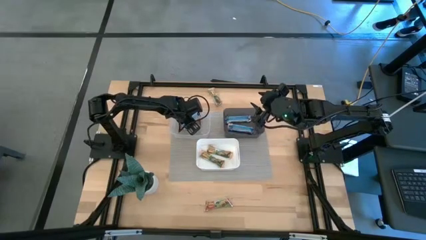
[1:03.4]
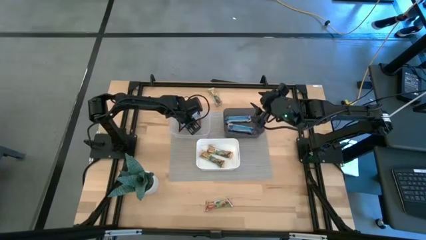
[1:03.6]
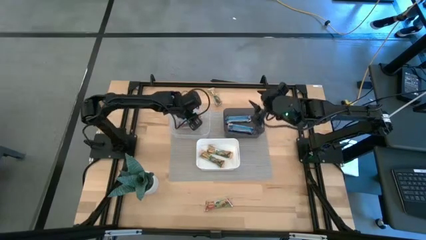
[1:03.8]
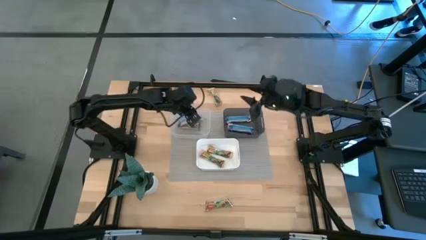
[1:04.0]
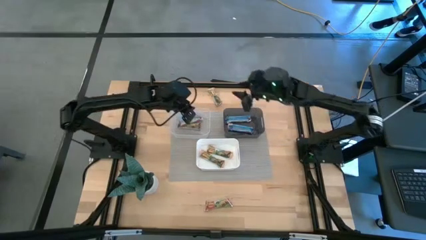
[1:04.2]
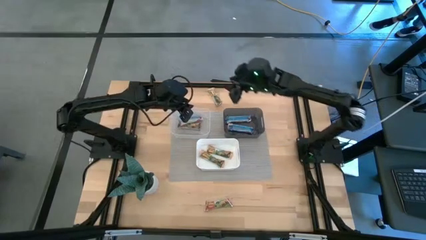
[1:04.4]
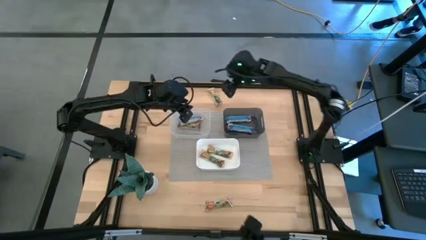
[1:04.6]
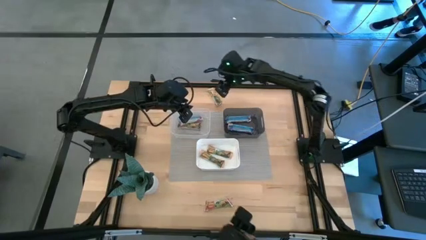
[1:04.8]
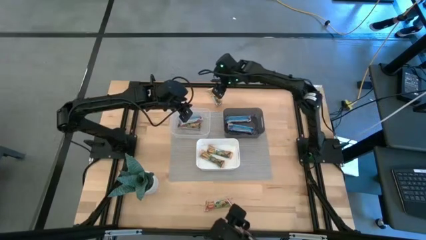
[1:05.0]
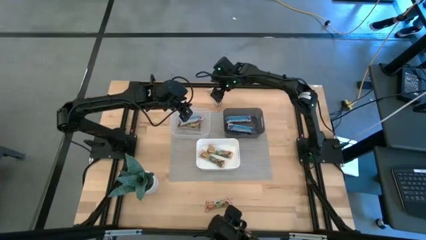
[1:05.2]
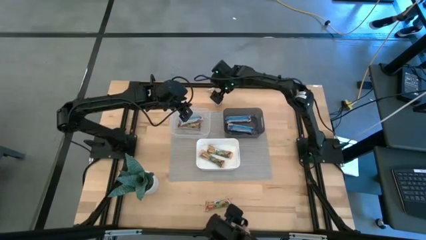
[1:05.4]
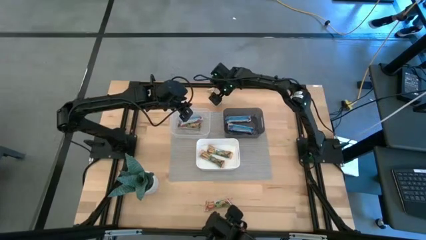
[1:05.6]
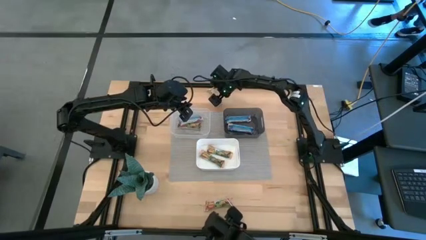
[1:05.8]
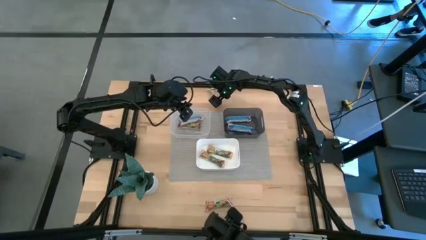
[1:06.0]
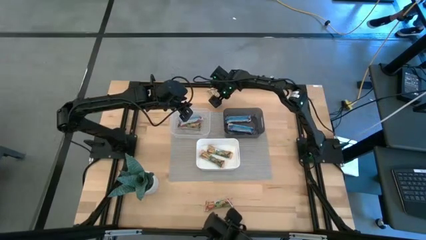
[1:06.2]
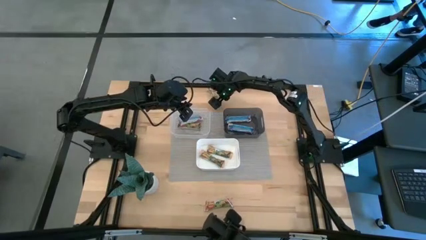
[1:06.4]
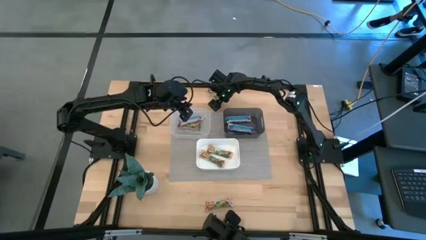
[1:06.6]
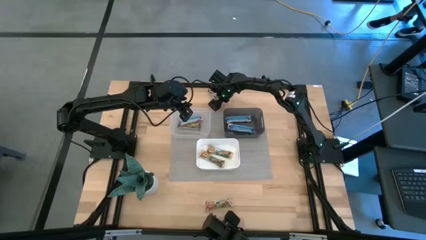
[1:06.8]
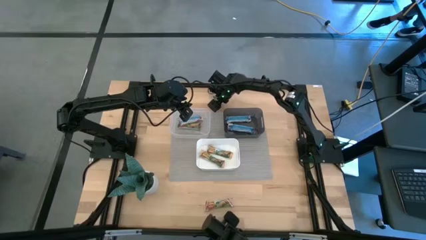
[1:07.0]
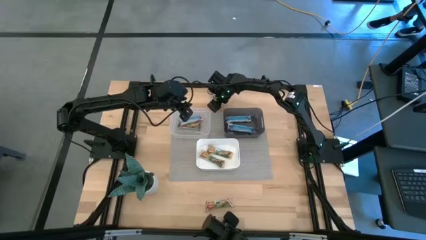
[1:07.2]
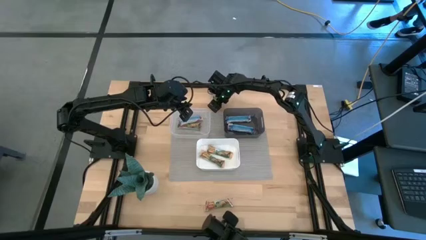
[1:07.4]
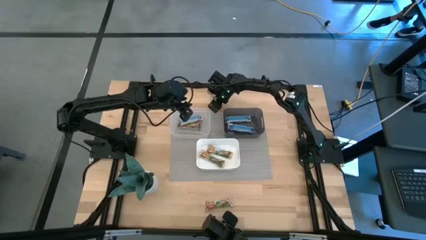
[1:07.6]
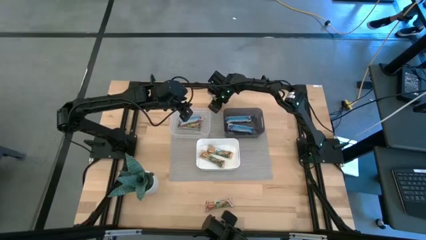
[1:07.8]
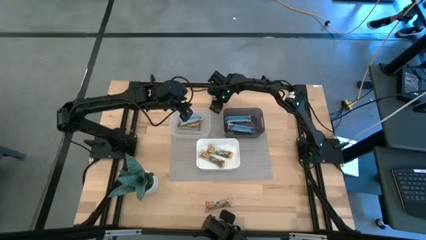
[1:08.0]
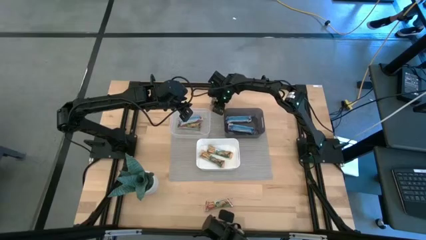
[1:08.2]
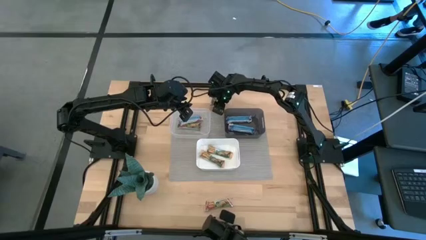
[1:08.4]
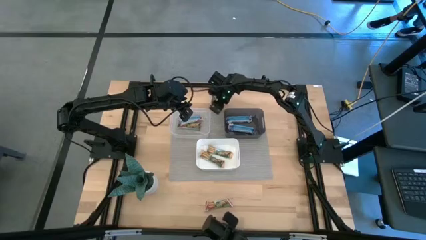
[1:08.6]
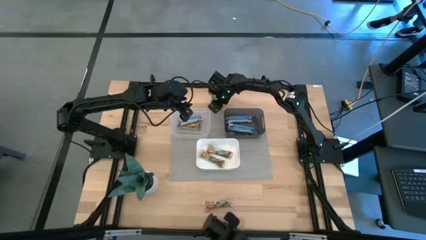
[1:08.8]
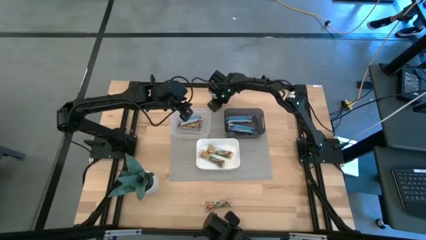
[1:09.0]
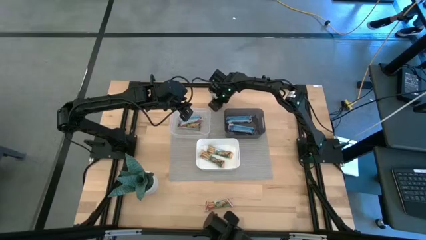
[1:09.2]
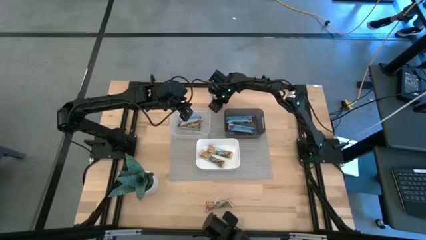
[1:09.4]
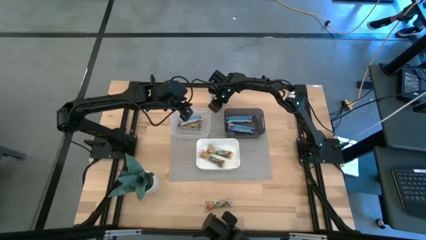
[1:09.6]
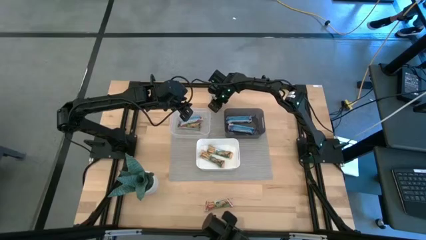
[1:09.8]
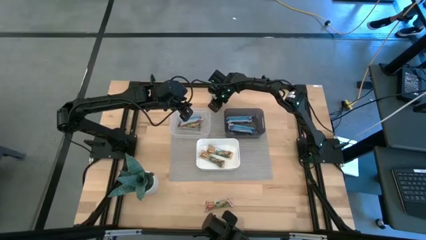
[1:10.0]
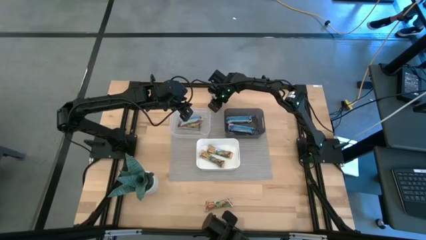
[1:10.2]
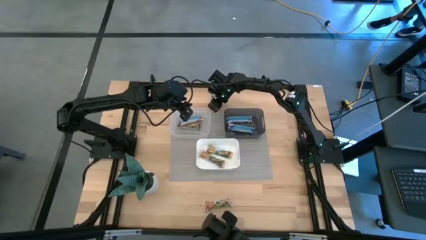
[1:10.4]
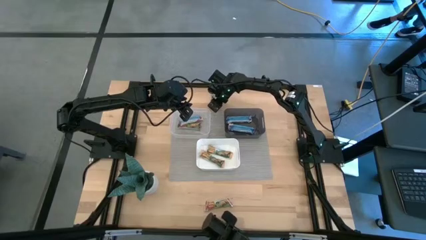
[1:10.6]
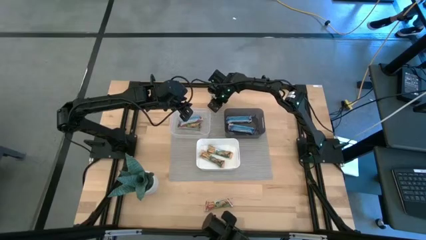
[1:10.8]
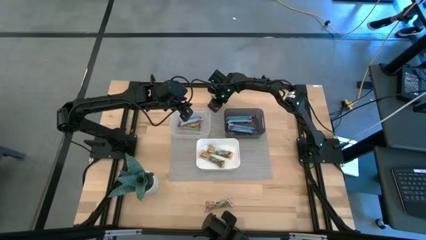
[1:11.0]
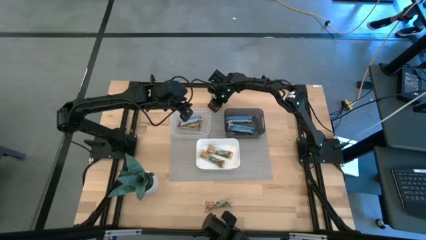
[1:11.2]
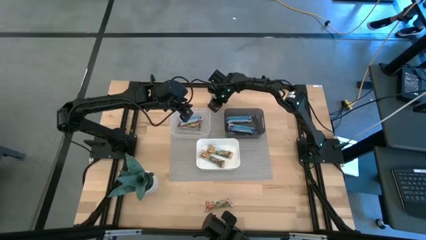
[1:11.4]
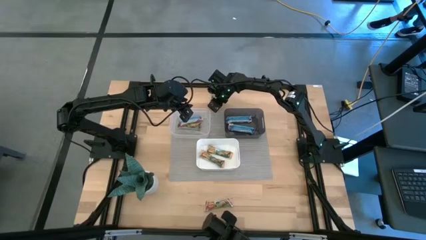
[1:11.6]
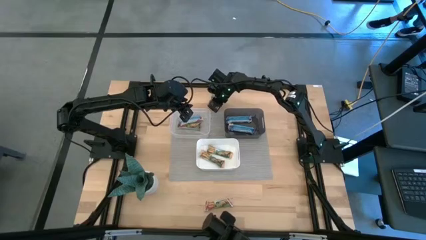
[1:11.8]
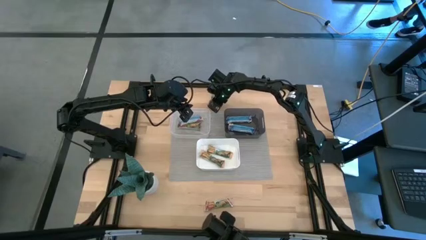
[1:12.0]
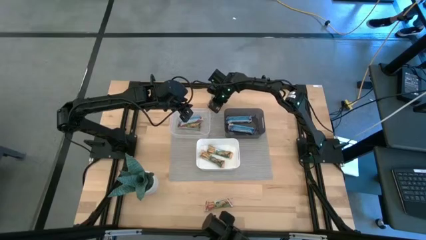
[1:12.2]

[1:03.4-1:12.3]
Task: Pick and place Granola Bars by type
Put the yellow granola bar into the white bin

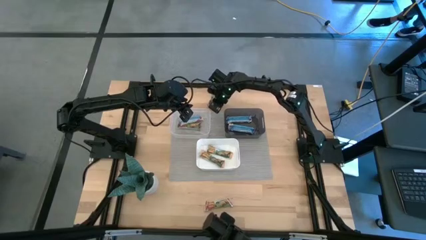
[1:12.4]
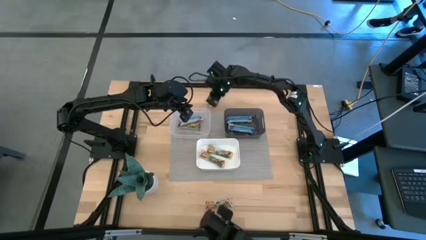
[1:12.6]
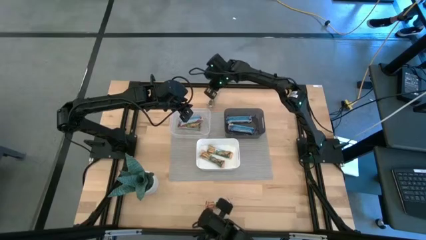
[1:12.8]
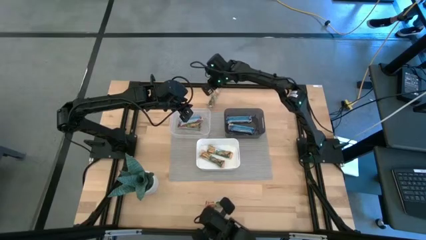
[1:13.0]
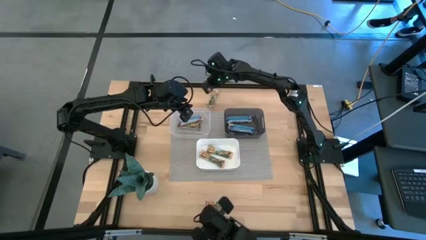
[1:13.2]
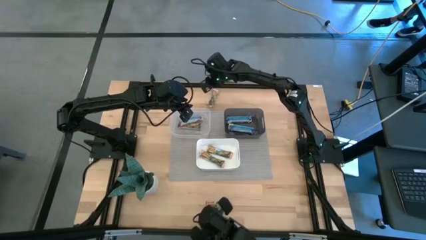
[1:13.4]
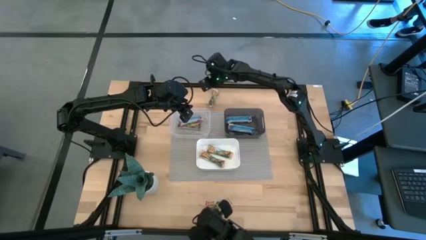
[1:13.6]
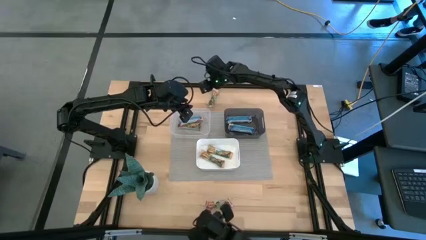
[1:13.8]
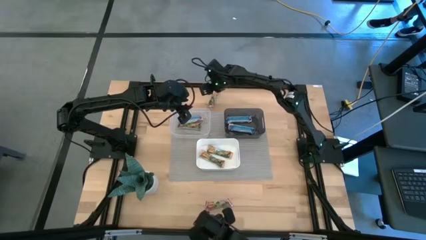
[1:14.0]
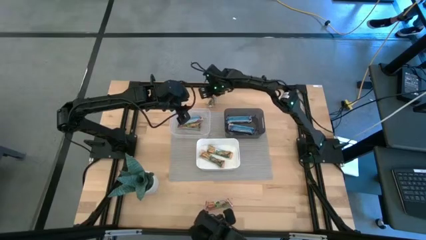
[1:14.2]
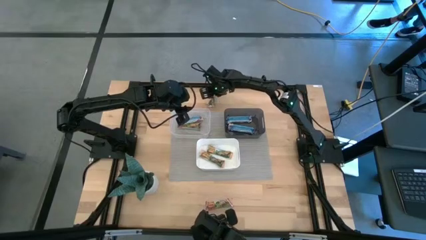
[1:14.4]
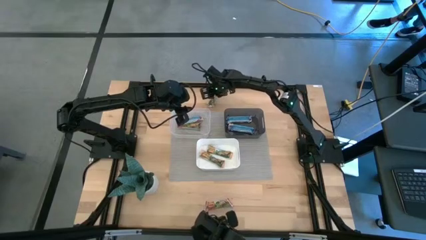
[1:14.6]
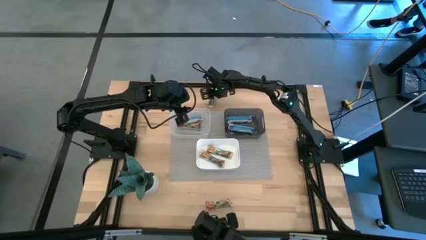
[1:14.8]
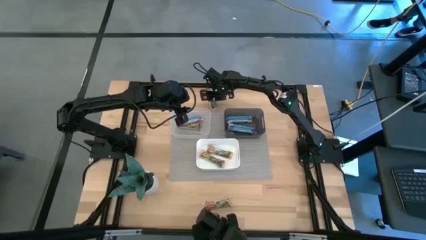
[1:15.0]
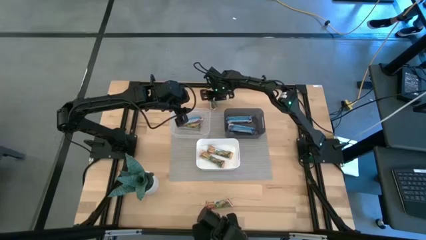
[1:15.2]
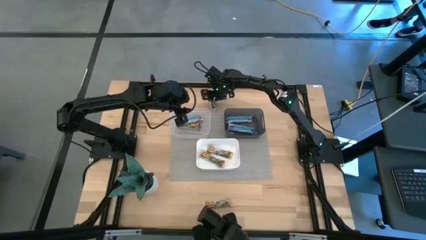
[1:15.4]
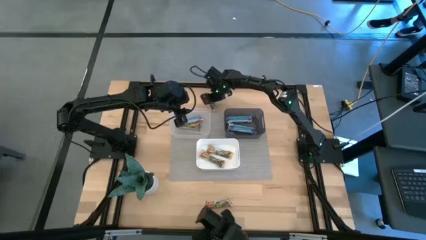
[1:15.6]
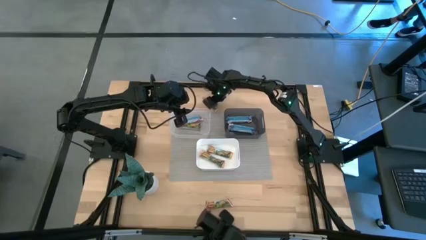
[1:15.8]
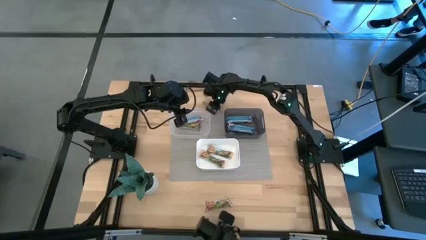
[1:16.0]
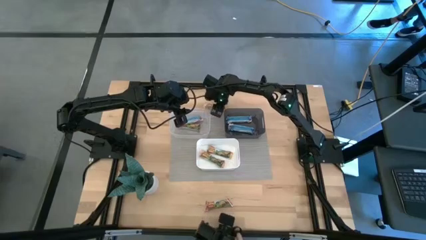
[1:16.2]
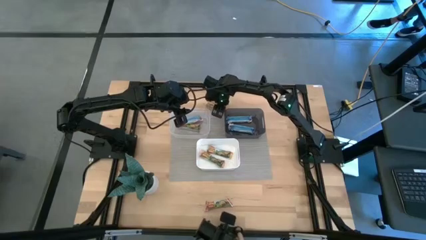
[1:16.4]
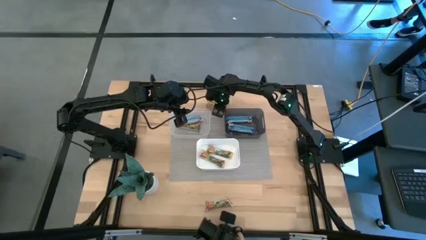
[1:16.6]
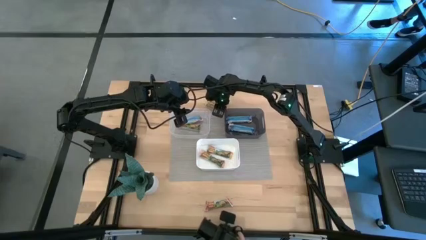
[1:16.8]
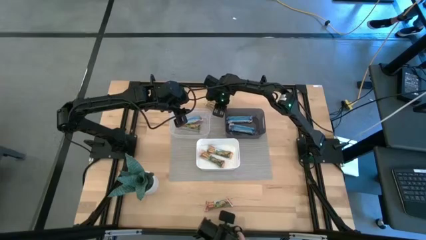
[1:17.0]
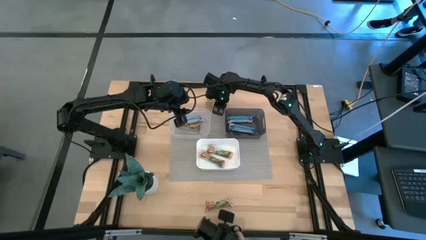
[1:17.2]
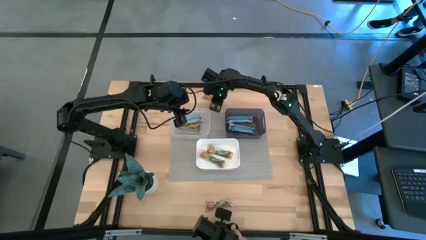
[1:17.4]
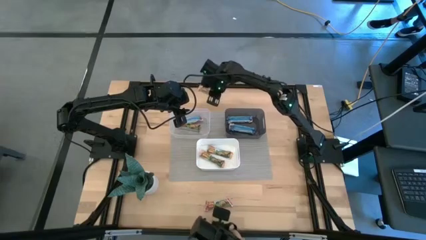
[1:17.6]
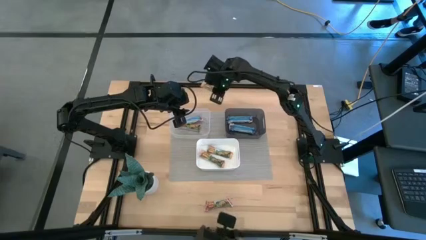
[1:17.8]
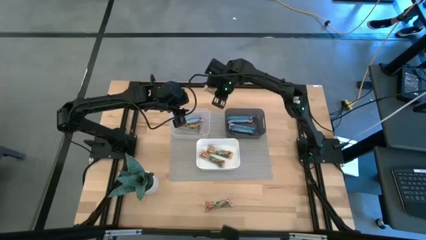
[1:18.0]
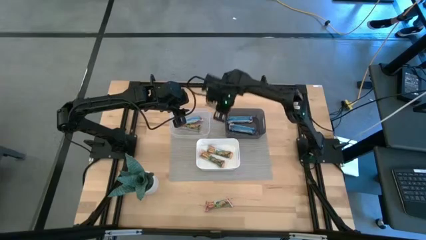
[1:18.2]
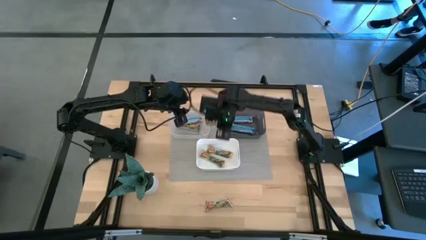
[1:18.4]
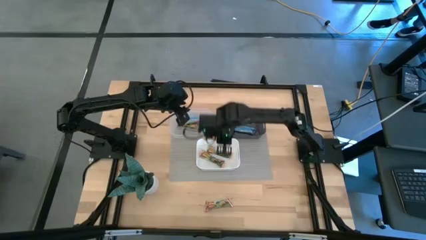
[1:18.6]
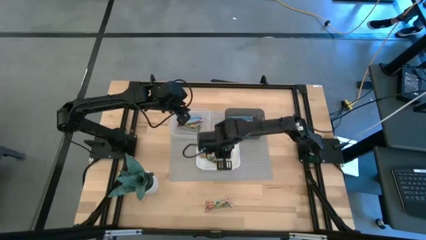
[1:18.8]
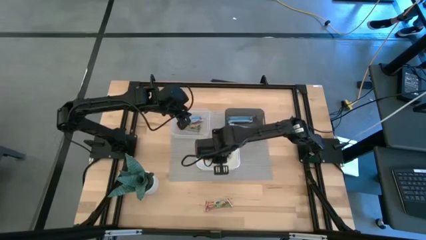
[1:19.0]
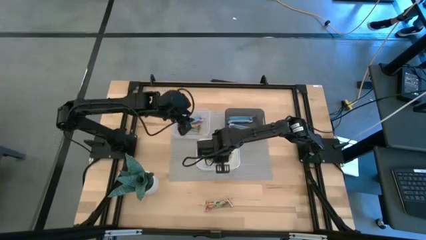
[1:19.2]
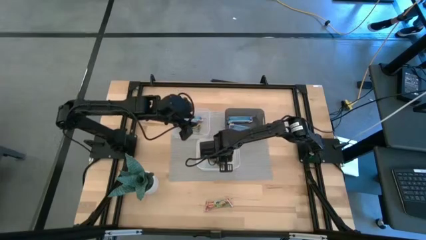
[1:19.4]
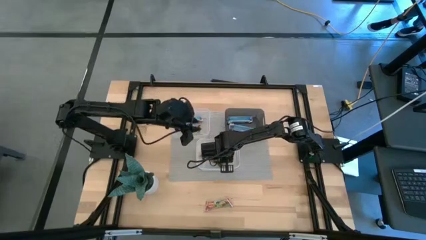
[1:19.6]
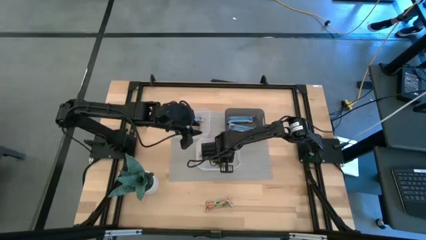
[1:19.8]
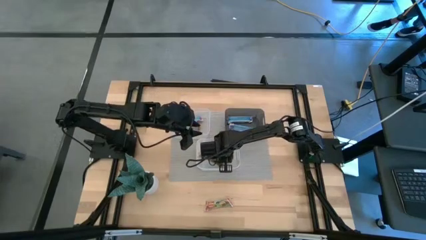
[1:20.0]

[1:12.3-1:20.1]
Put the yellow granola bar into the white bin
